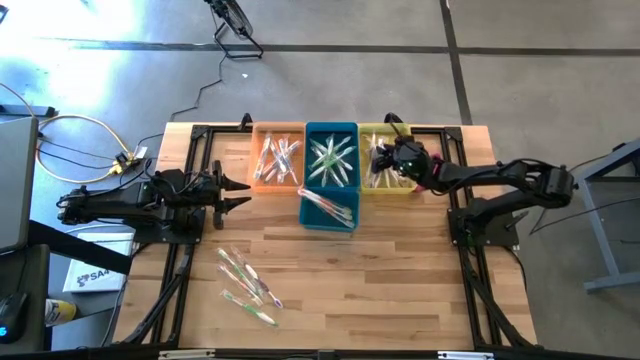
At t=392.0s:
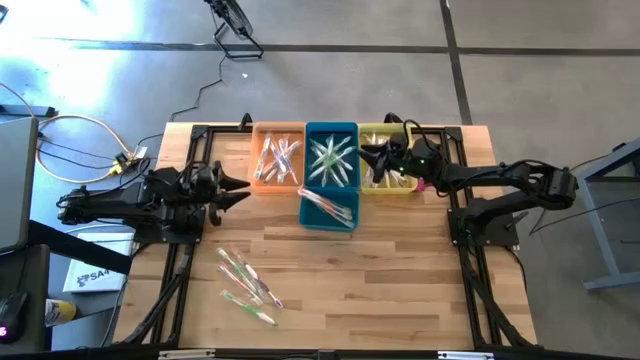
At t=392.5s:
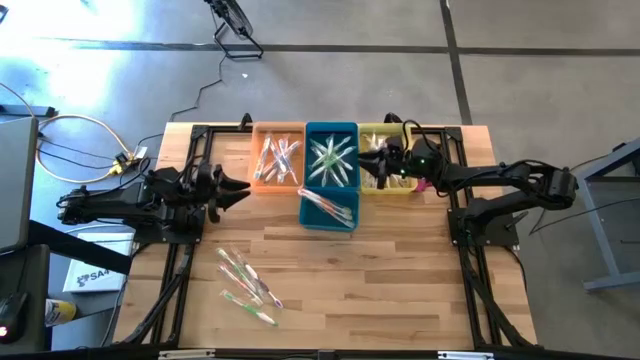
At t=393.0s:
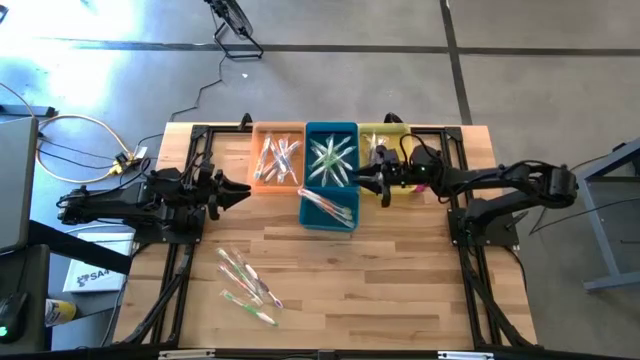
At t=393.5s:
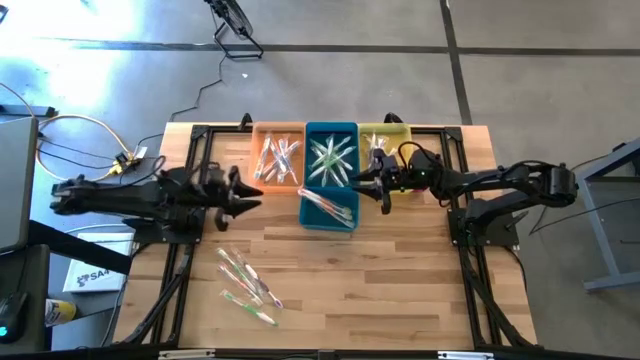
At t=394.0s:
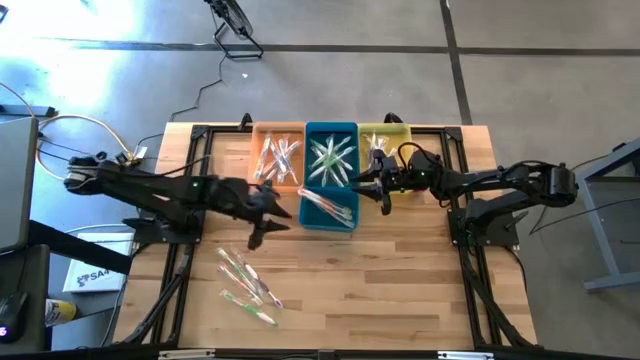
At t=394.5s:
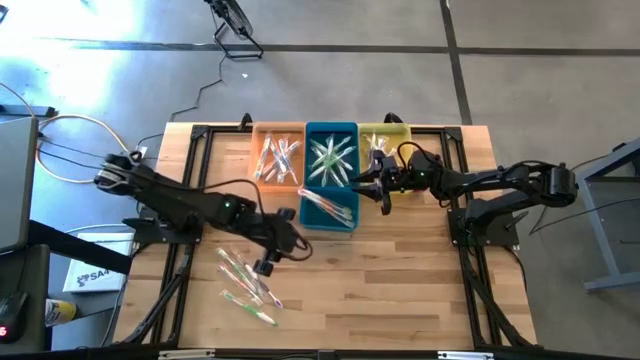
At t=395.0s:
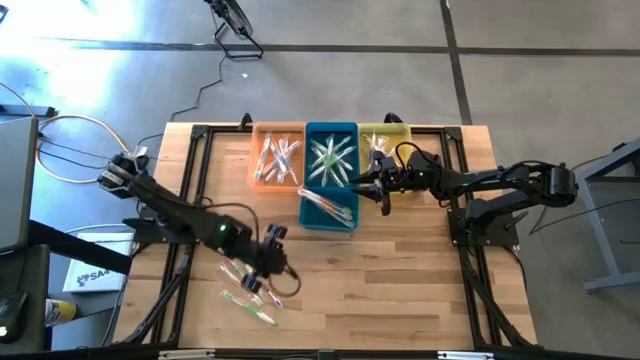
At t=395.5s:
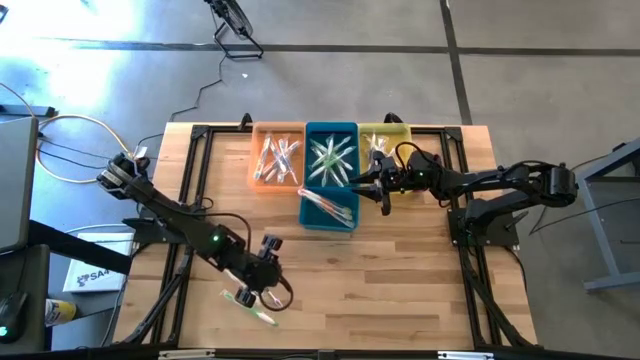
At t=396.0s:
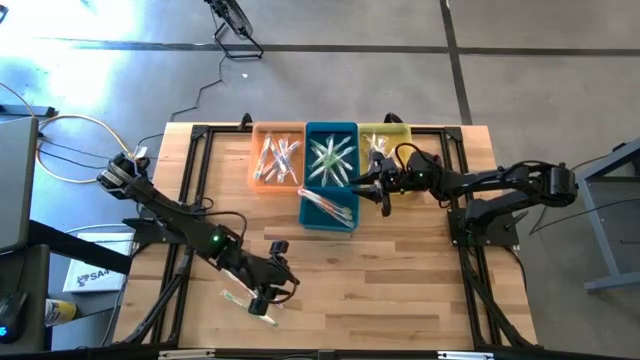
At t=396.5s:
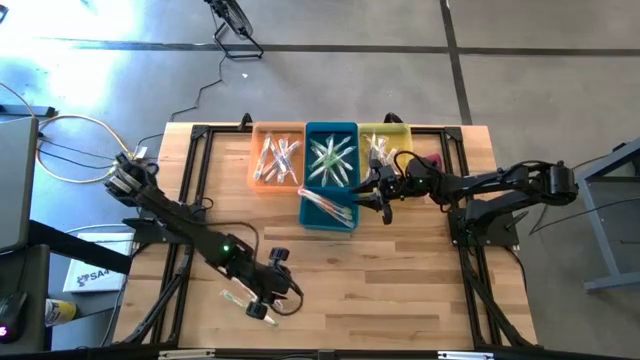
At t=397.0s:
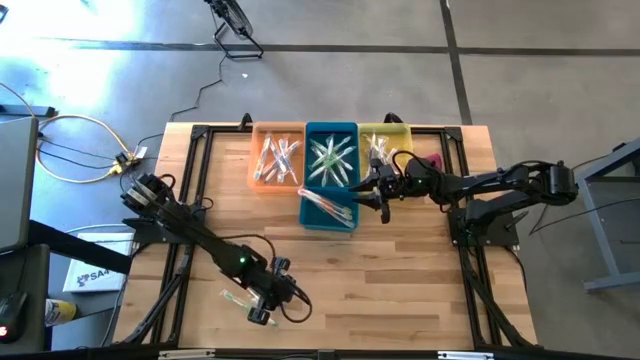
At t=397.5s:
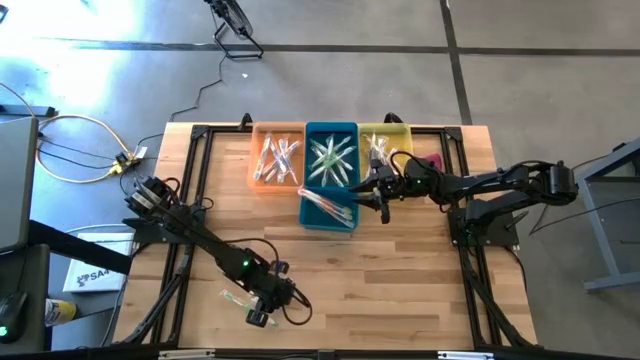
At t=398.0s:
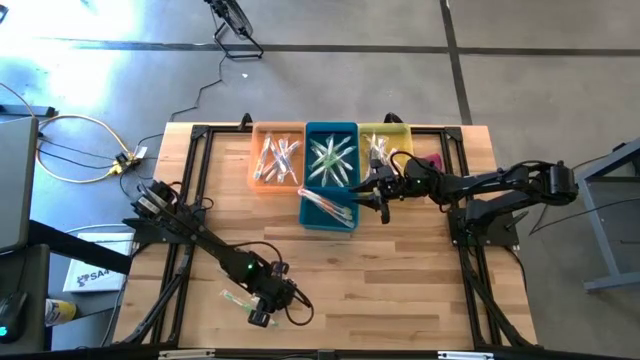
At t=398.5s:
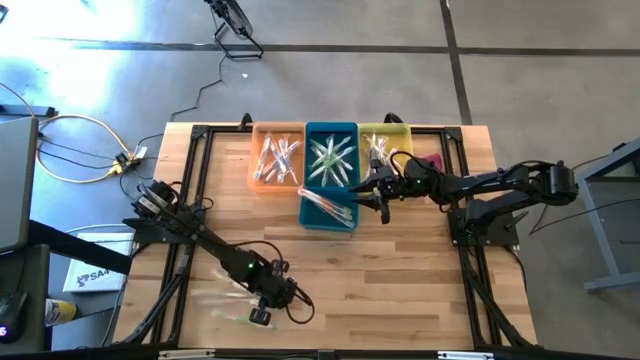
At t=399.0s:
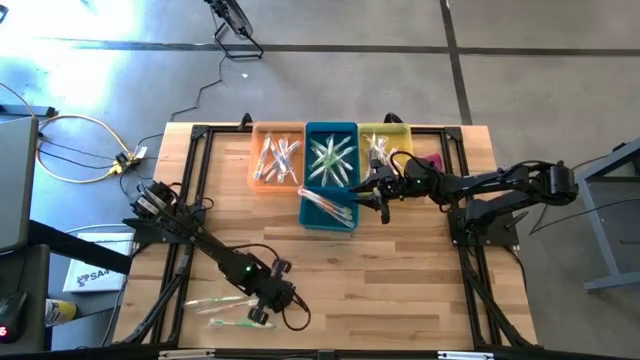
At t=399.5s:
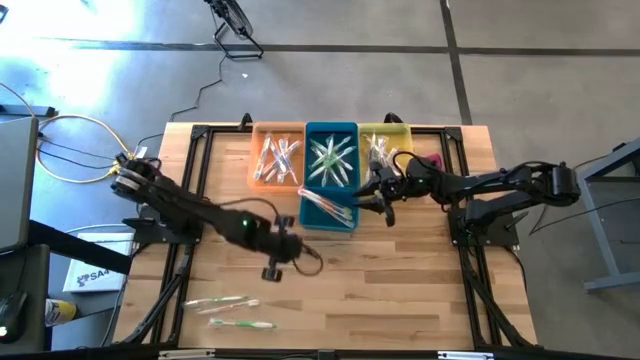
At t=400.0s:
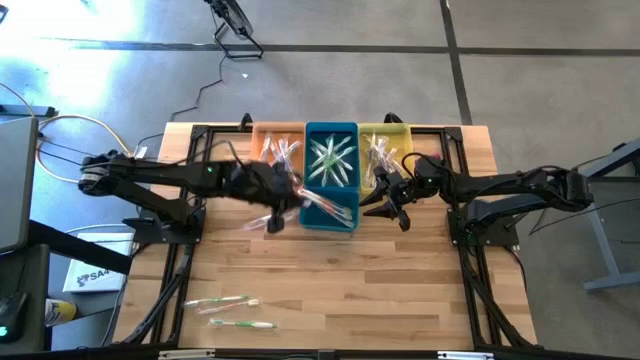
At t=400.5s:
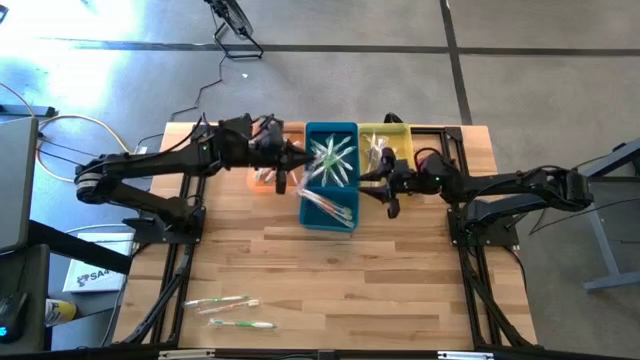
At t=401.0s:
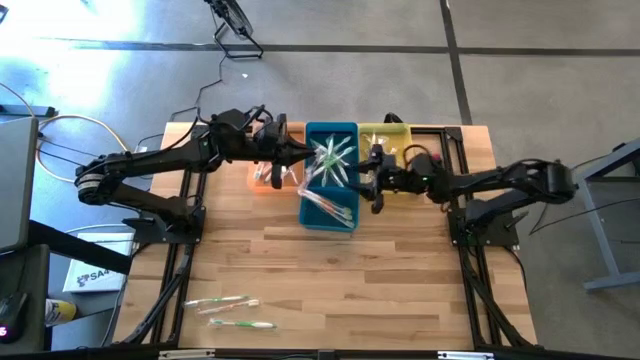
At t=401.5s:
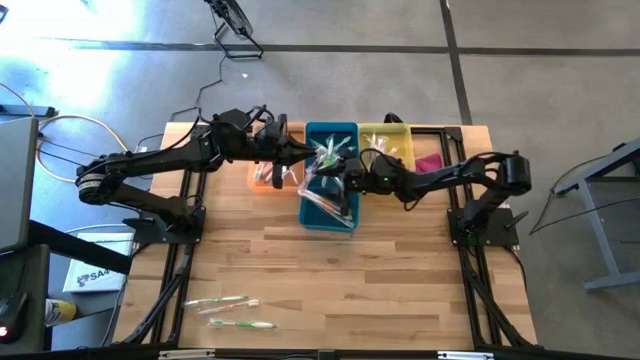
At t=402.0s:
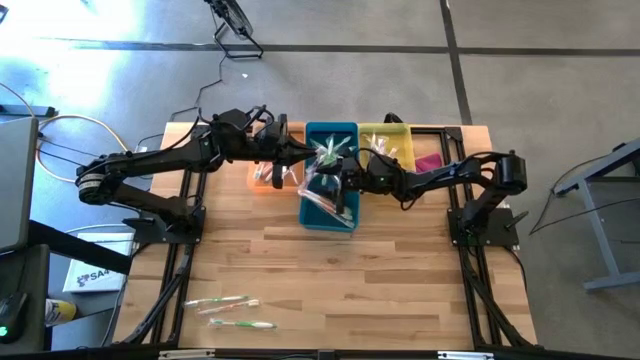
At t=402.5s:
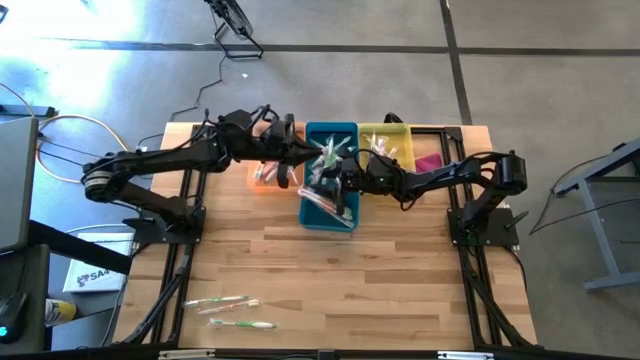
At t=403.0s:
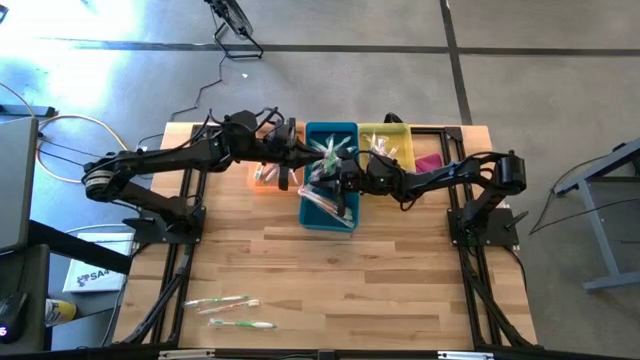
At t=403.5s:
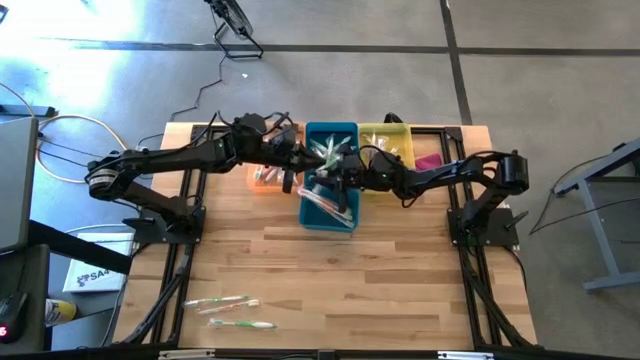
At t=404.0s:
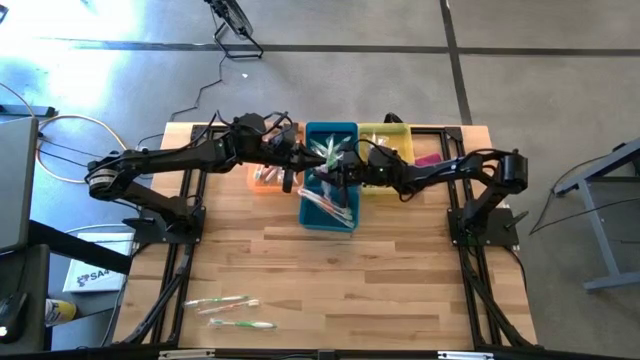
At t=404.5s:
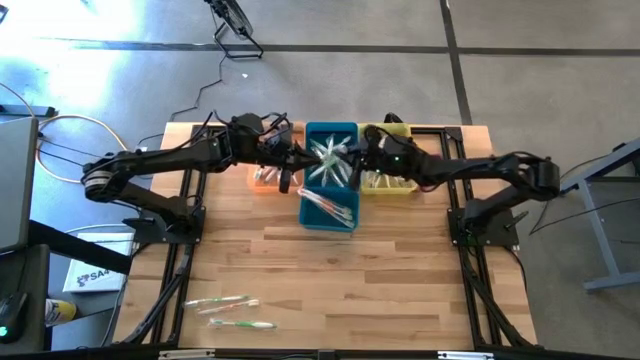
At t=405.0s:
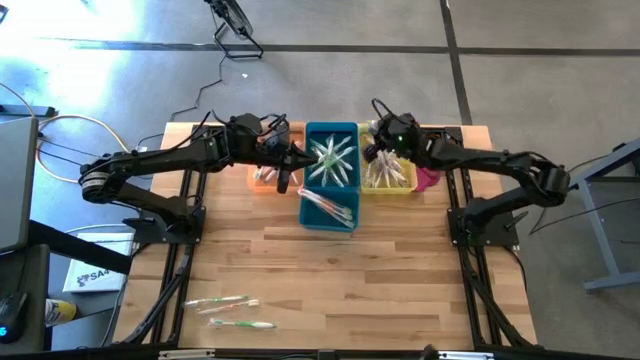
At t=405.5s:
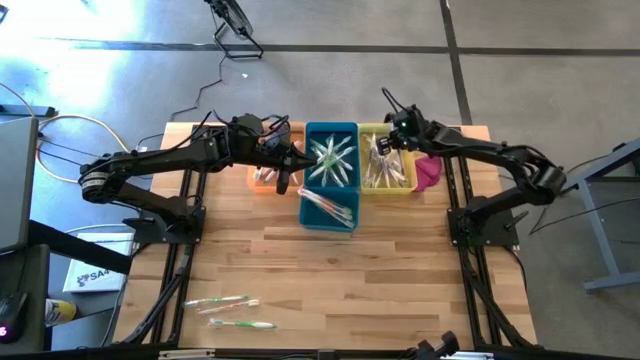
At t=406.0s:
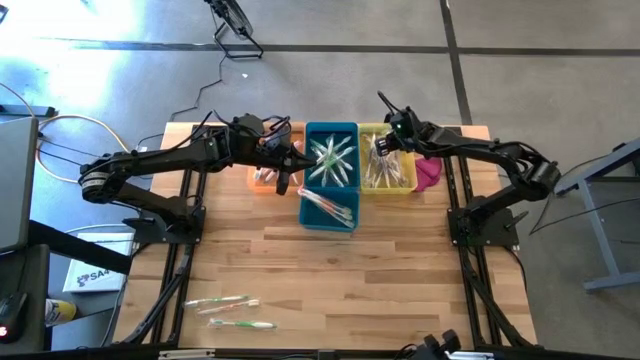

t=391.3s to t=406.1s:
Task: Pick & Place Toothbrushes
Put the violet toothbrush into the yellow bin

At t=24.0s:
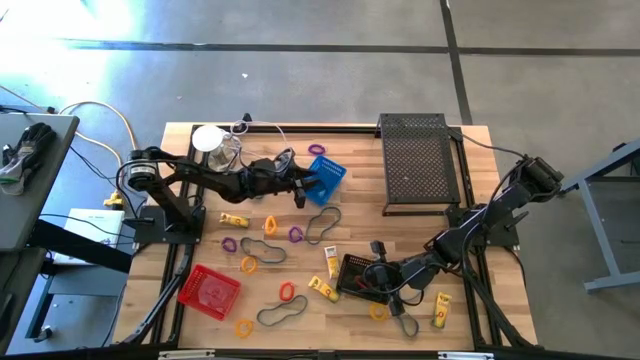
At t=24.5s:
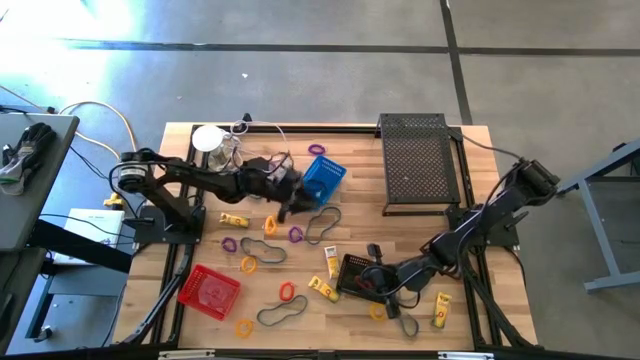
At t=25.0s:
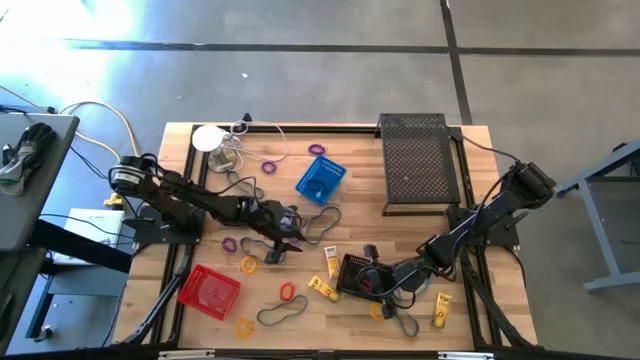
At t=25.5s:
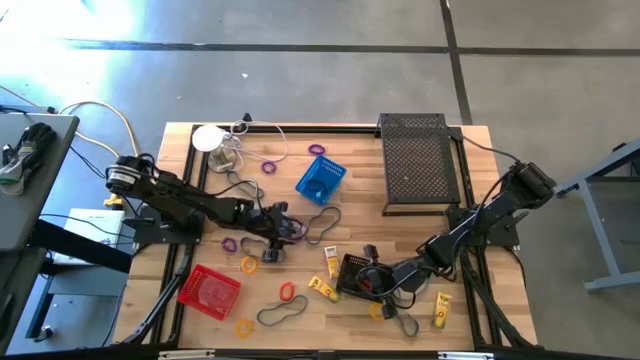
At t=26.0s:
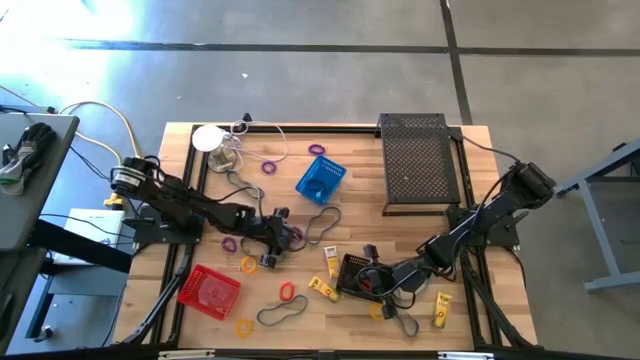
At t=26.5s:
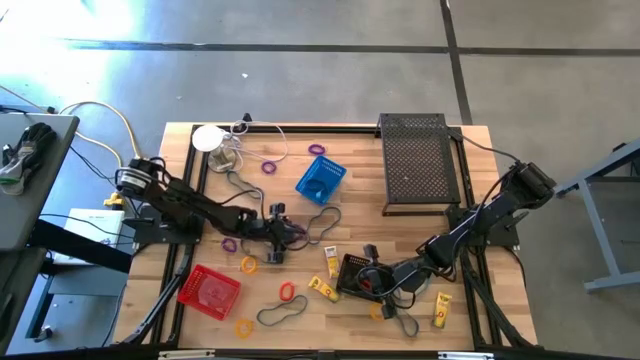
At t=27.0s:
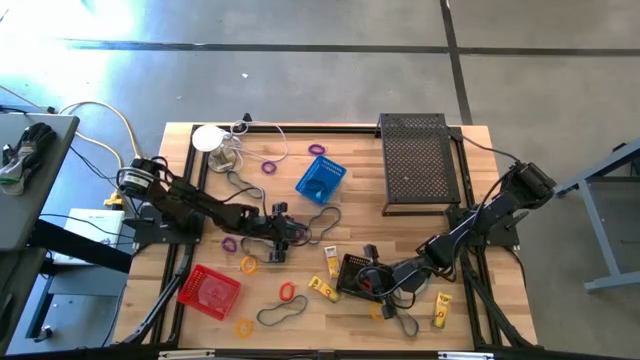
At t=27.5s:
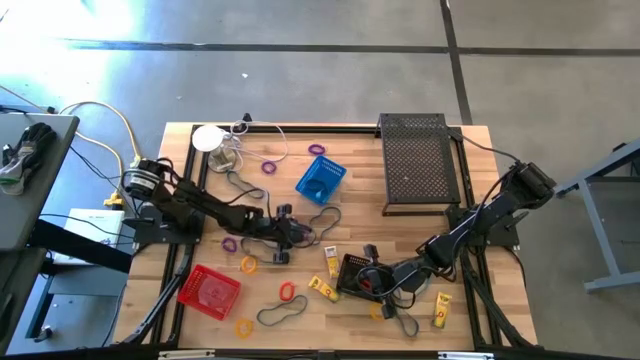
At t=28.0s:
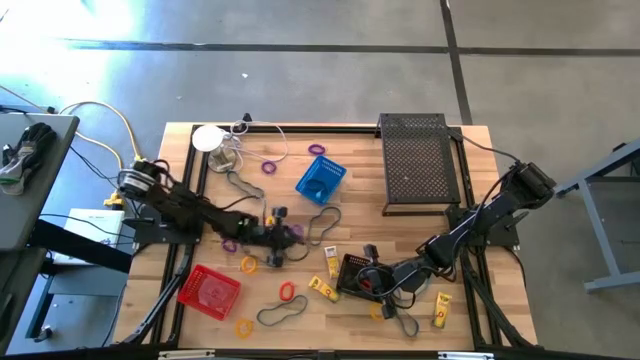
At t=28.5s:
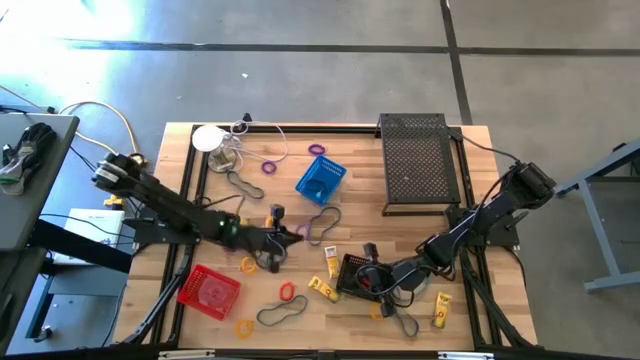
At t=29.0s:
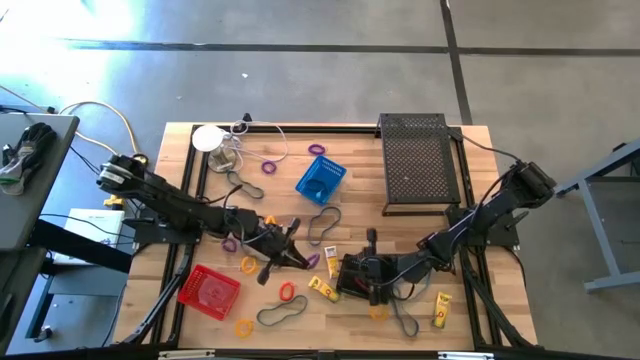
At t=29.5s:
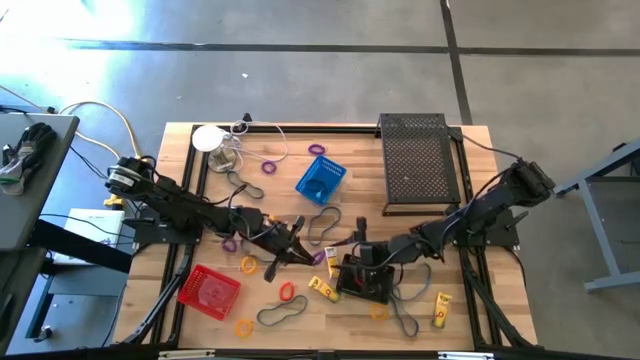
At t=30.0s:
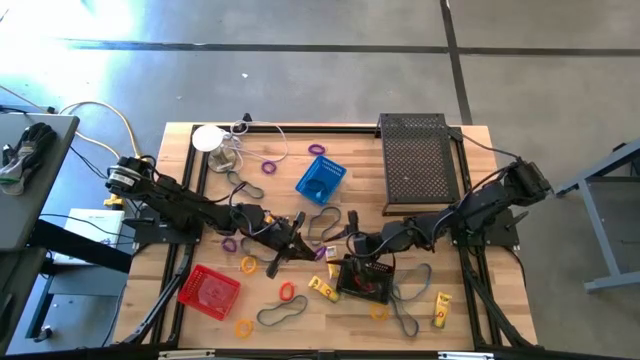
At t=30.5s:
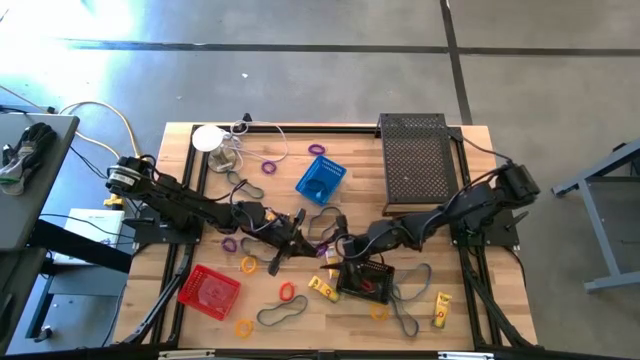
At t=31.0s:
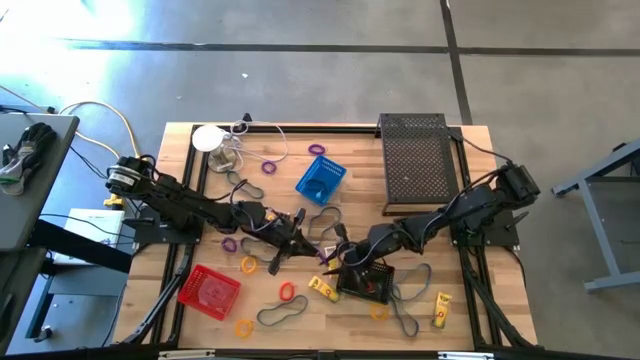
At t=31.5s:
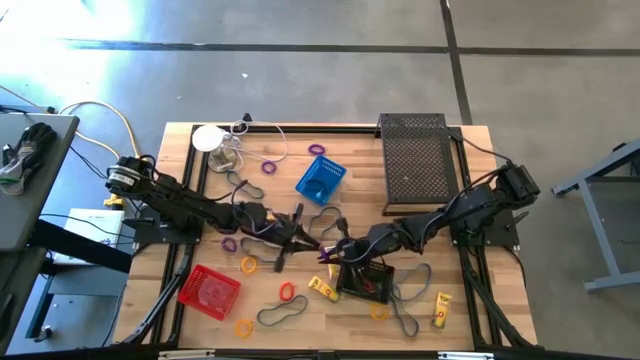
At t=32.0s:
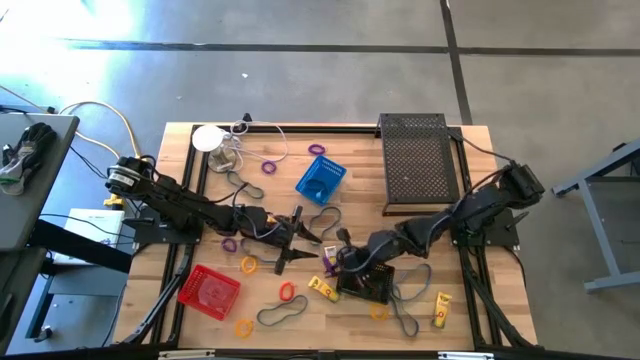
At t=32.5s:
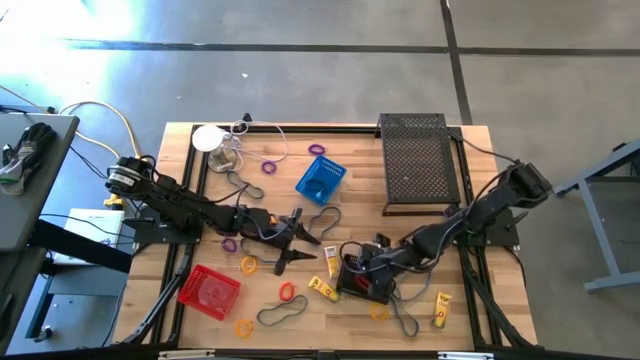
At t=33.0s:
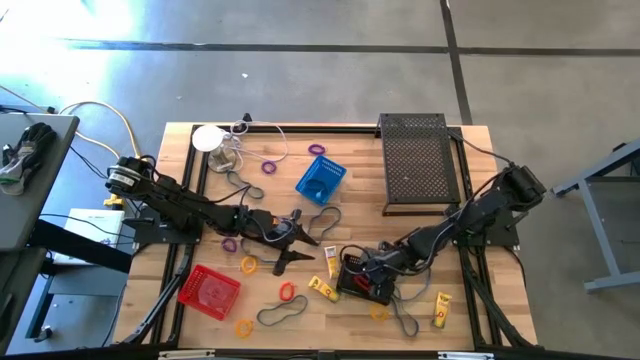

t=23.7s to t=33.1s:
Task: Pick & Place Office Desk Supplies
Put the purple wrist coil keychain into the black bin
